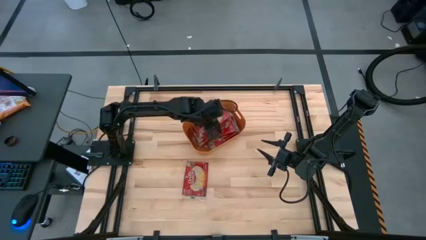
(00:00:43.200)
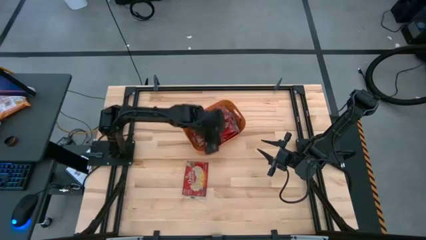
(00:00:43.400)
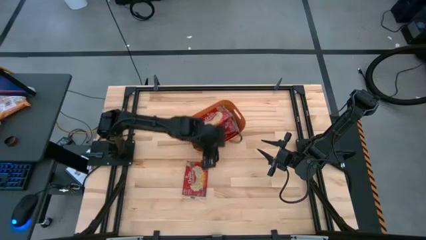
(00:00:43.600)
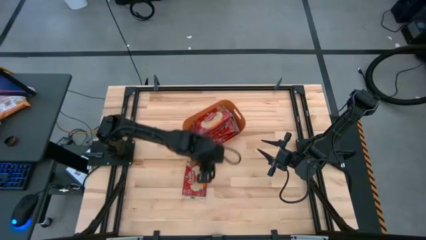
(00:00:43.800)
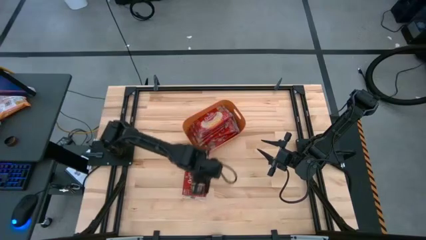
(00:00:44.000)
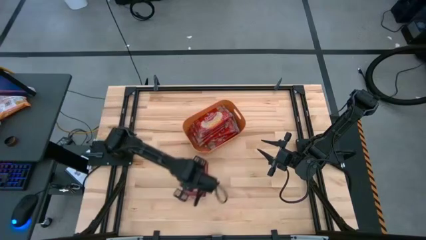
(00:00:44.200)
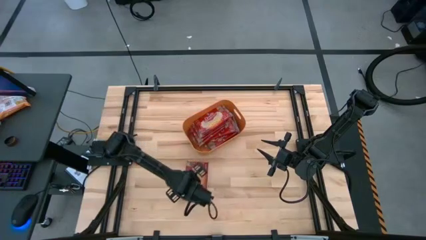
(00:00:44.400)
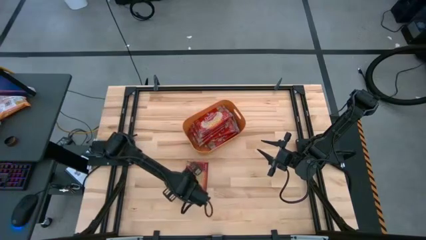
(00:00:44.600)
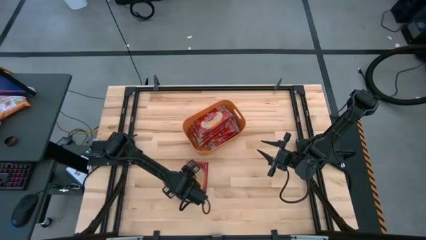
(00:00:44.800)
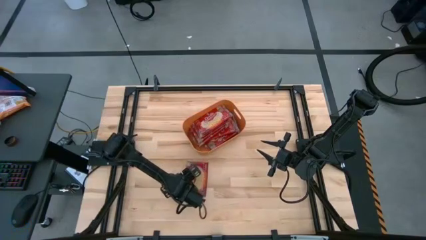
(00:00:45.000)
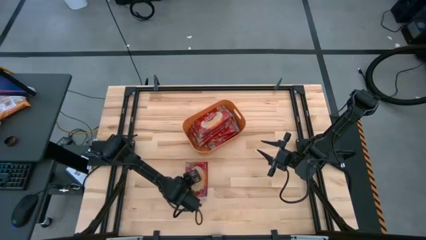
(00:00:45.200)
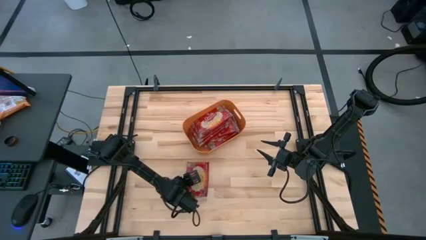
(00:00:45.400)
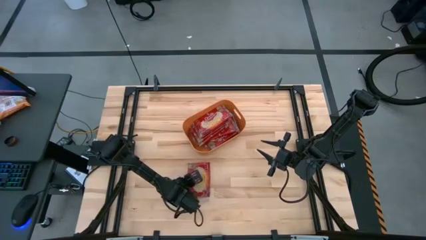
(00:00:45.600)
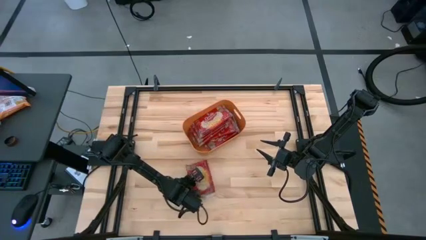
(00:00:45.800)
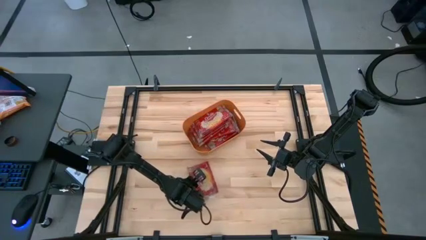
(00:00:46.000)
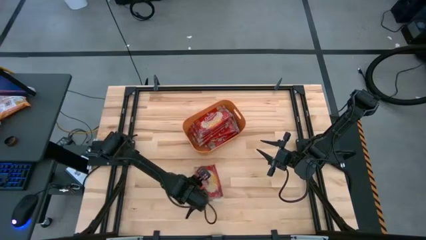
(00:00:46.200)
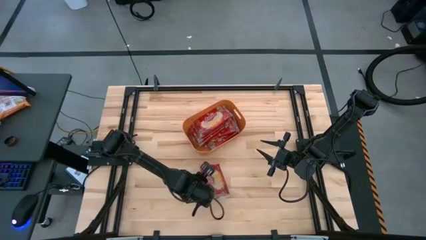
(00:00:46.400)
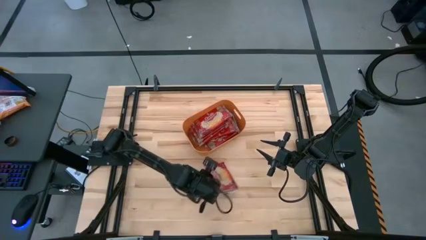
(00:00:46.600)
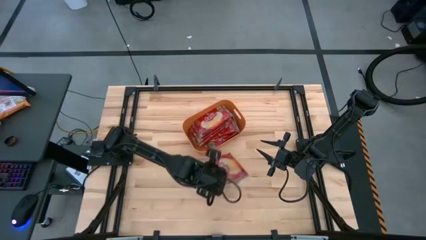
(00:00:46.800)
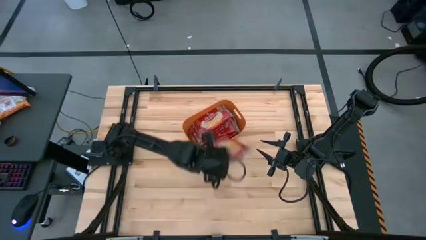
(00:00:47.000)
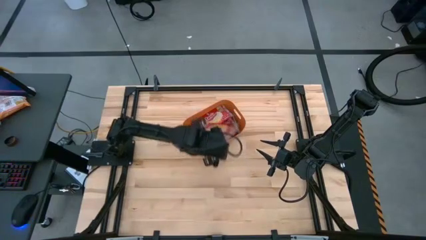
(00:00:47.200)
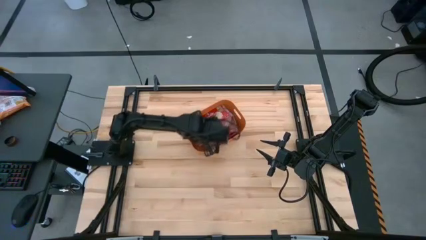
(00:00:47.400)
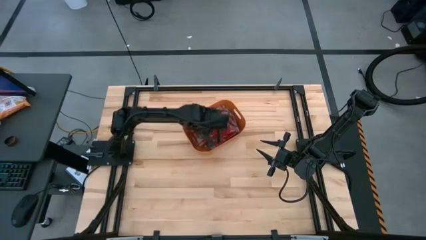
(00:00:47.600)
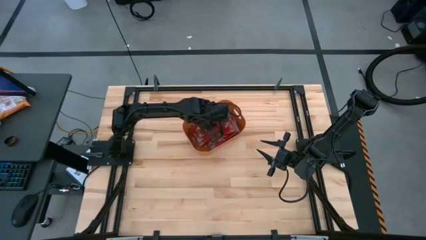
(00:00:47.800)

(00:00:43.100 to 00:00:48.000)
Task: Sort popcorn bags into baskets
Put the pop corn bag into the orange bin

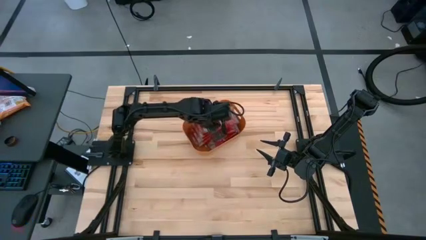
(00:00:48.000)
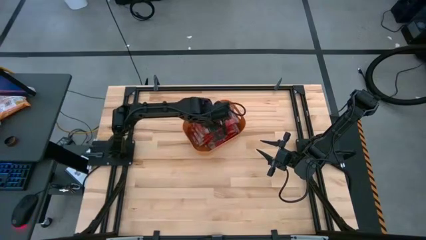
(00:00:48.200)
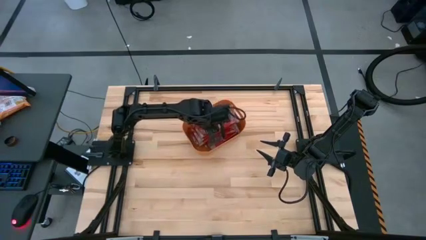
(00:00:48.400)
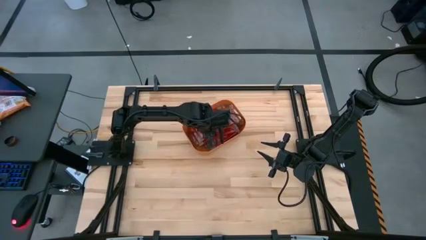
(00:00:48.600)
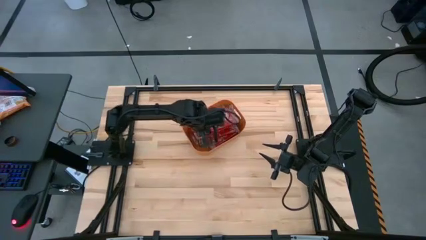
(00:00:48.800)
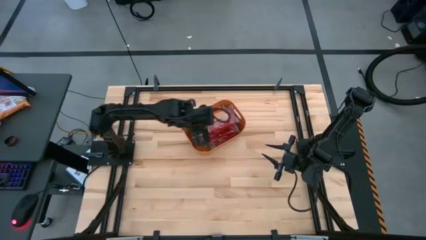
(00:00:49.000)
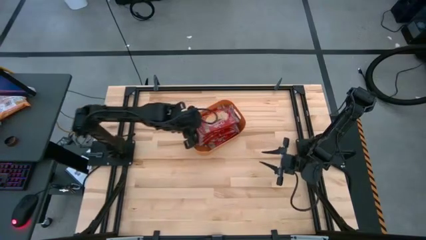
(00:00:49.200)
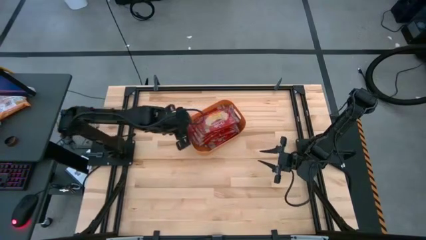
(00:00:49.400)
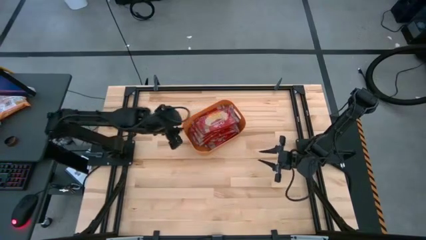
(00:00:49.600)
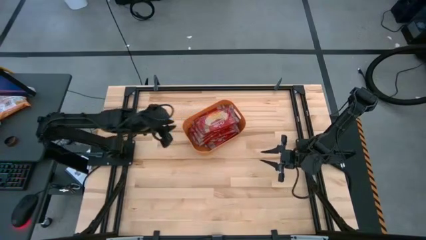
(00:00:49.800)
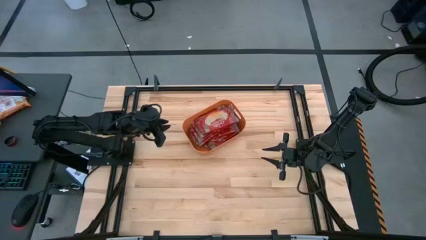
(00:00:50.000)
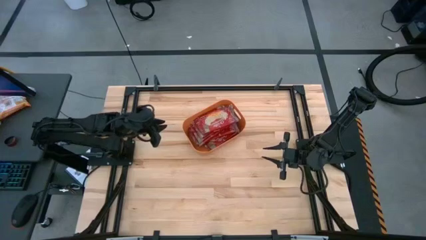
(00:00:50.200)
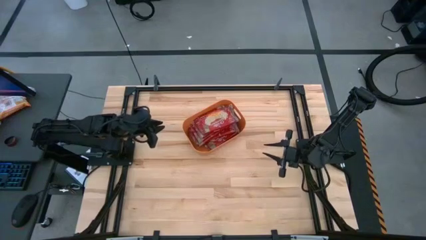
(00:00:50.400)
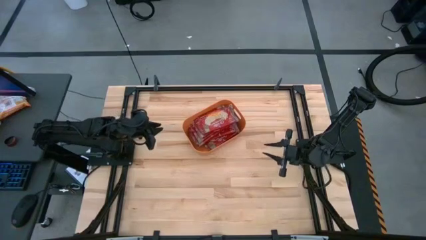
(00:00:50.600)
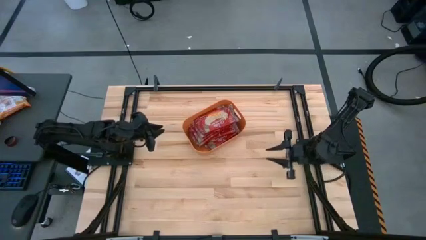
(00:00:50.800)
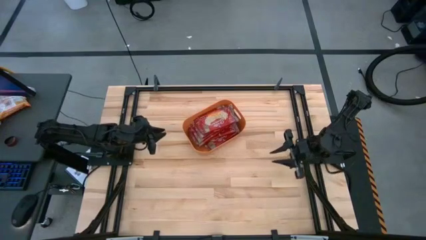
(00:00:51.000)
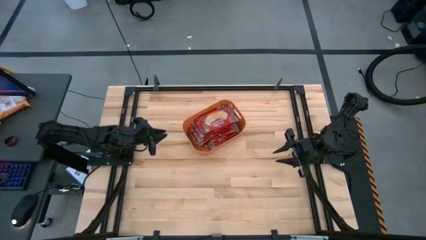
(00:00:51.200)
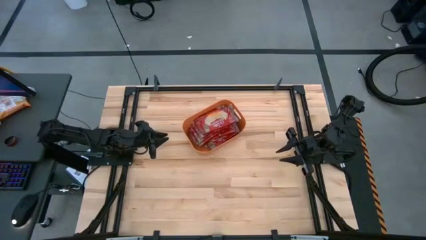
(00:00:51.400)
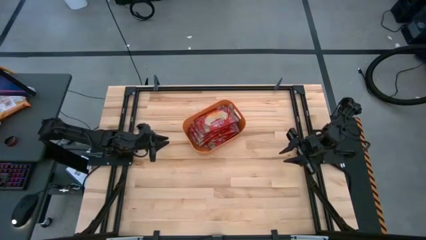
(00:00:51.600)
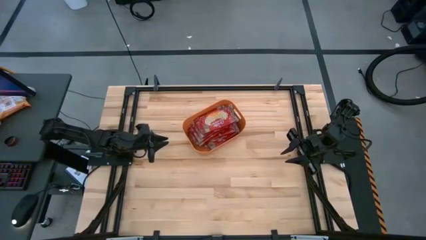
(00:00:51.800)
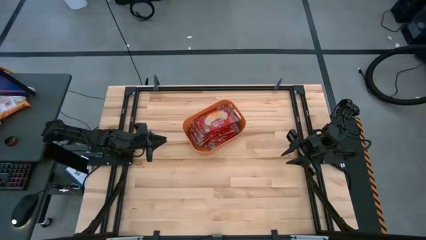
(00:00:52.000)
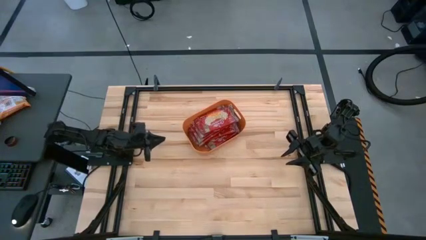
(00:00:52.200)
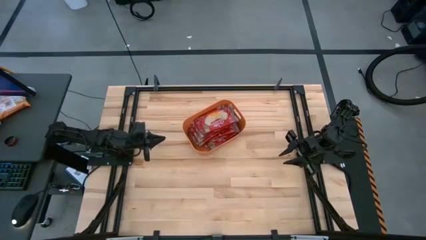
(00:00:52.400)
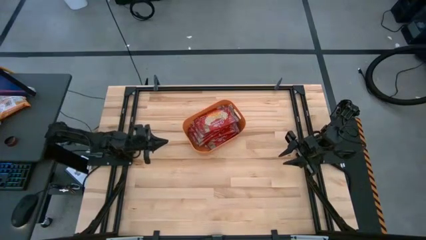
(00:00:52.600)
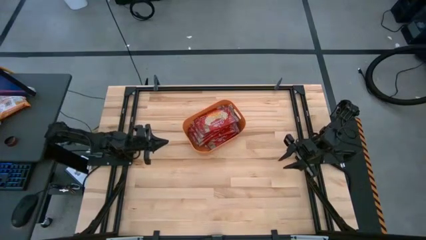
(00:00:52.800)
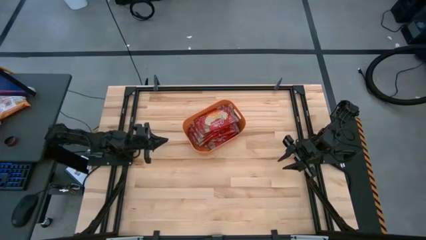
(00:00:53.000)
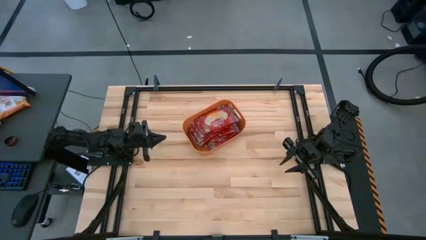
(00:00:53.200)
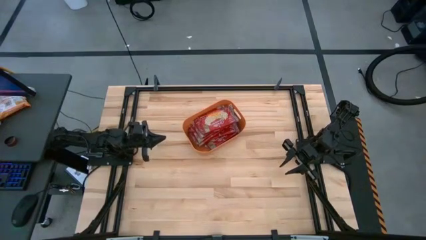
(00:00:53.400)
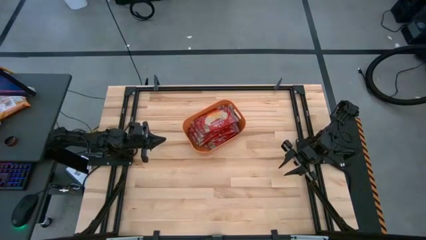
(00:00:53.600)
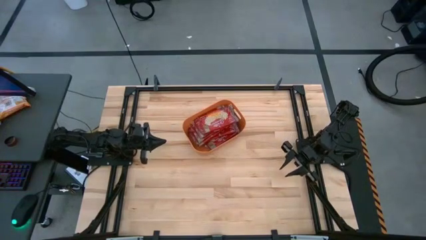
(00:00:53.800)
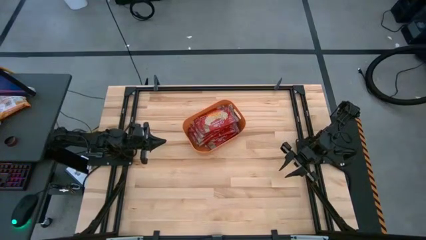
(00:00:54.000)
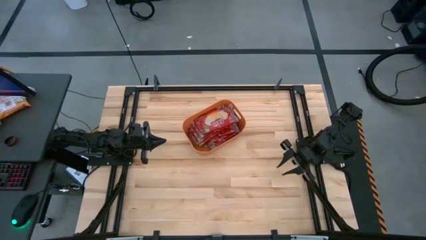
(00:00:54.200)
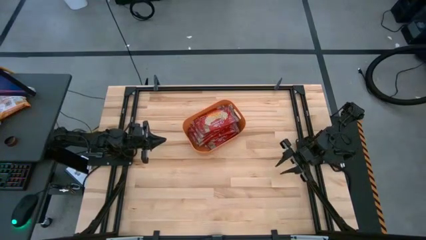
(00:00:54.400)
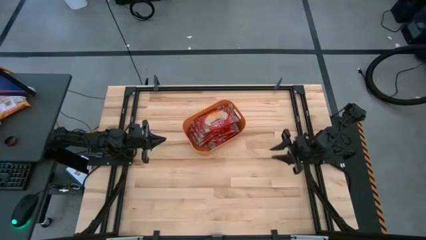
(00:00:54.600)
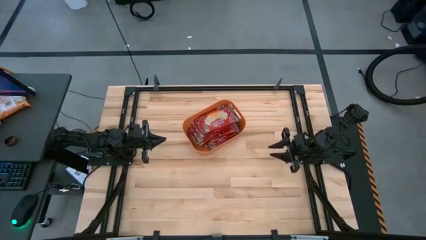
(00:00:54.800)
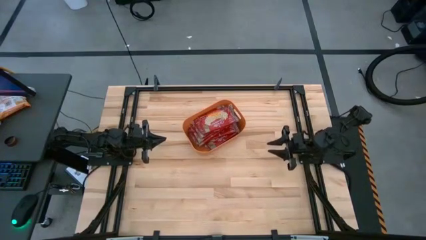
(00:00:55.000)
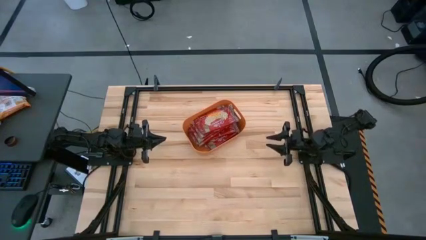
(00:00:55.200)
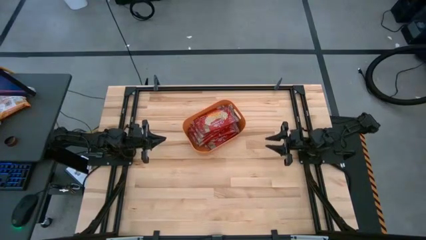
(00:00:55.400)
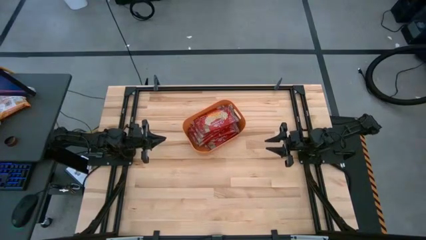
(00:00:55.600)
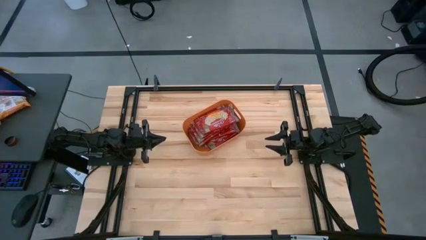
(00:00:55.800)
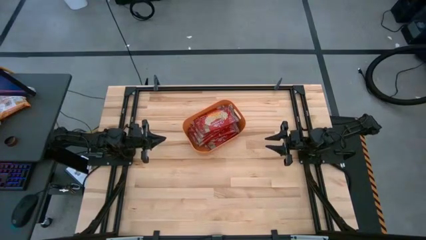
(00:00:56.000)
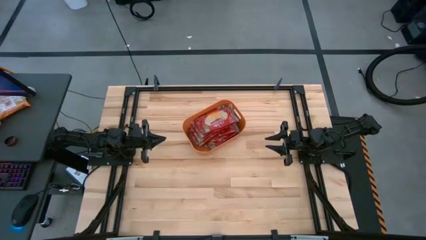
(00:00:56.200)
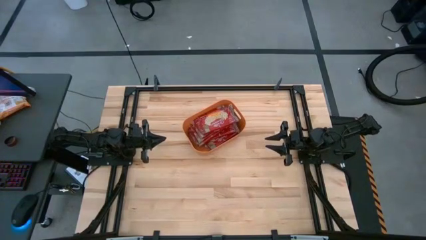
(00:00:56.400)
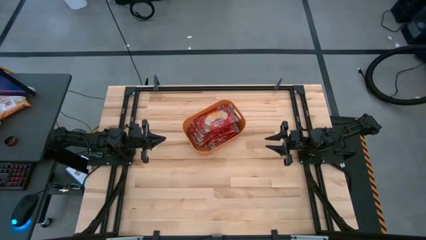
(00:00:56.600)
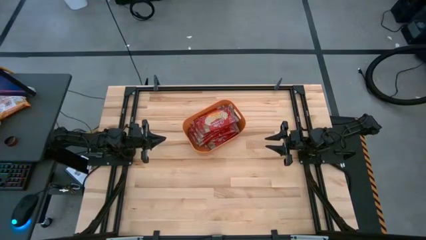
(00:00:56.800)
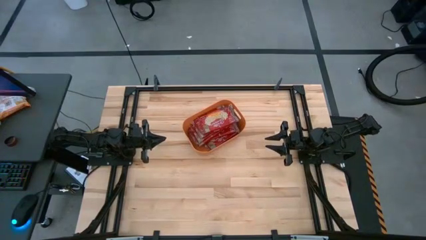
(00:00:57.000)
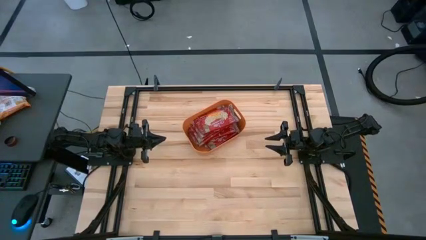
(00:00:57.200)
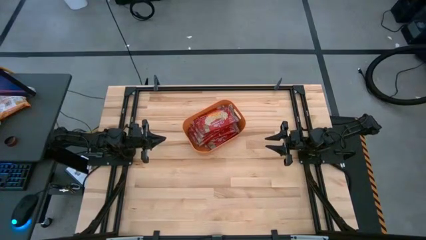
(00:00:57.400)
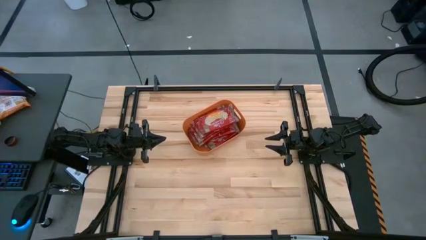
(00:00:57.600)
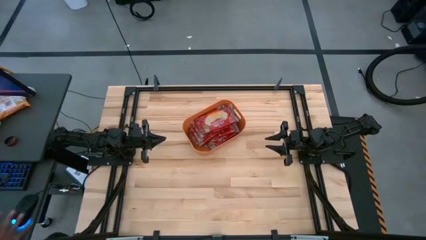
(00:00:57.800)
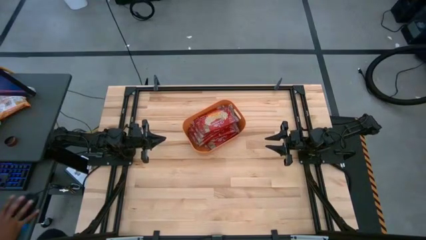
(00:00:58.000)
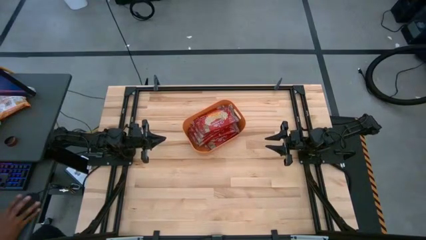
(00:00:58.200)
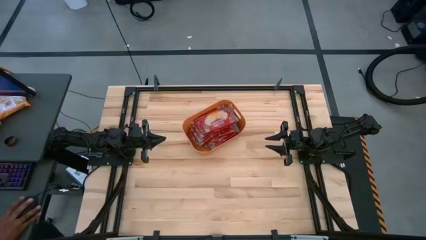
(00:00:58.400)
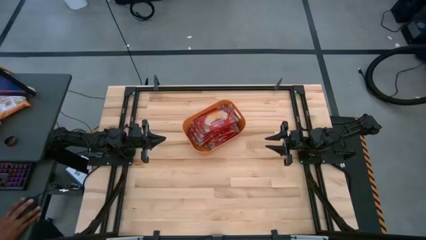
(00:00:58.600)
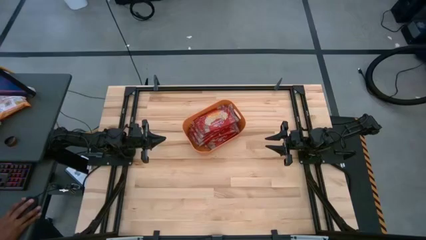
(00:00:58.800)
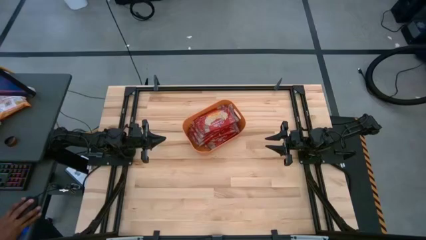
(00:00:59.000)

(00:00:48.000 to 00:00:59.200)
Return to Home Position

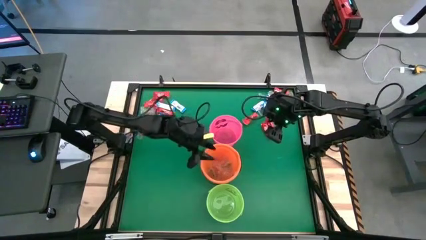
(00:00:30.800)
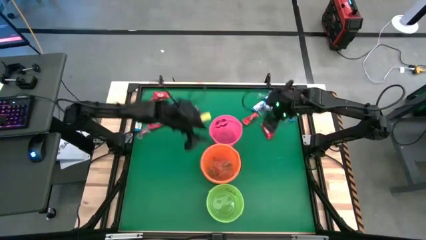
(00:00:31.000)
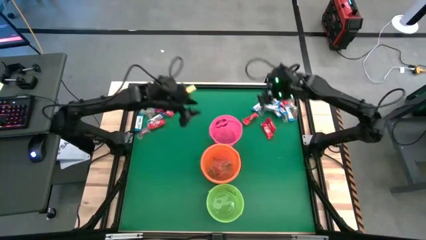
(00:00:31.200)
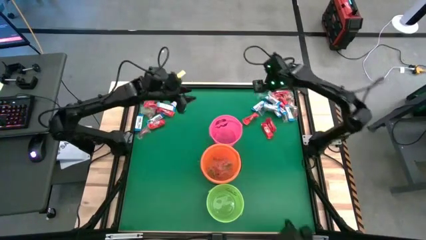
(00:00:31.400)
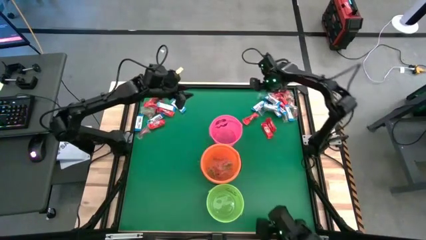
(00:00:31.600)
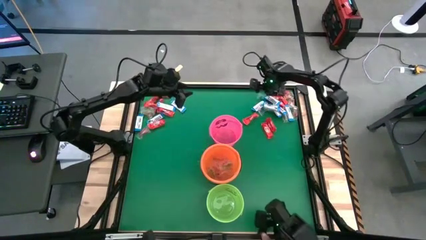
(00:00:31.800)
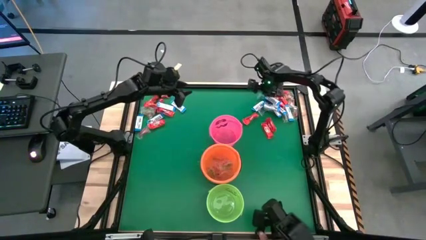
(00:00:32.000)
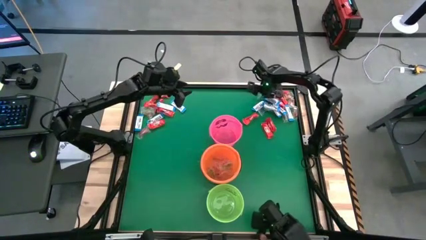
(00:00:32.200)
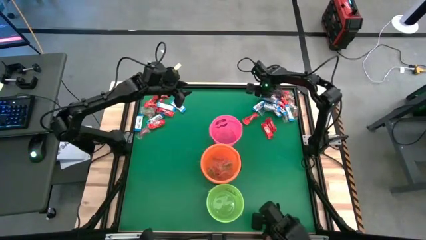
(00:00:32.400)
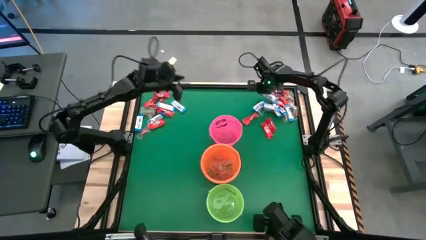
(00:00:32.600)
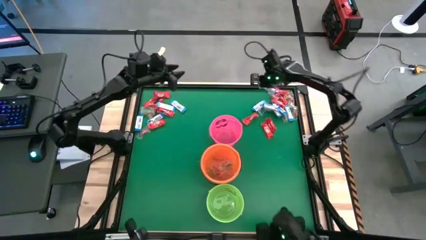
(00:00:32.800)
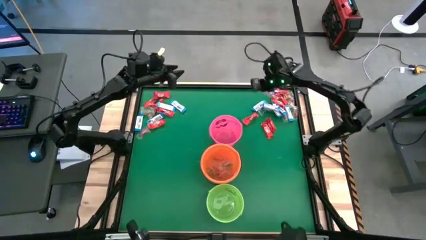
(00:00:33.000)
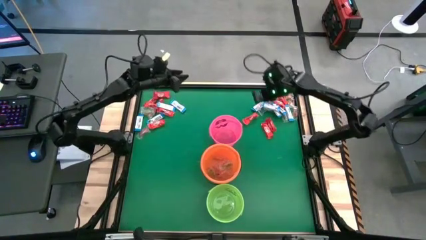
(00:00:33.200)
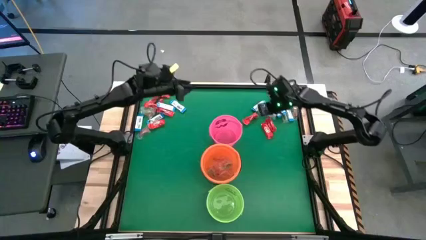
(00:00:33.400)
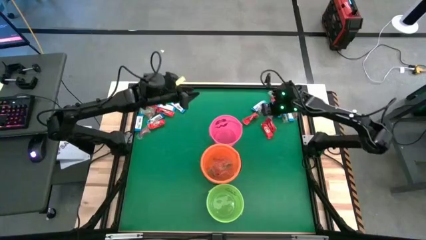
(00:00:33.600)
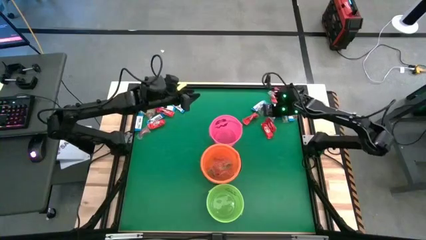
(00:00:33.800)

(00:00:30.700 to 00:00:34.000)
Task: Sort candy by brand, put in halloween buckets
Put the blue gummy into the orange bucket
